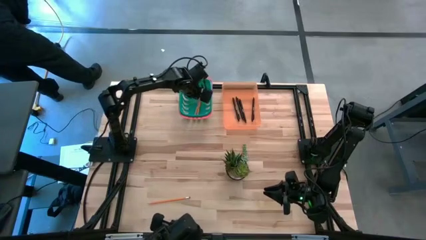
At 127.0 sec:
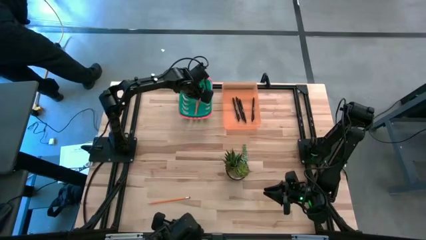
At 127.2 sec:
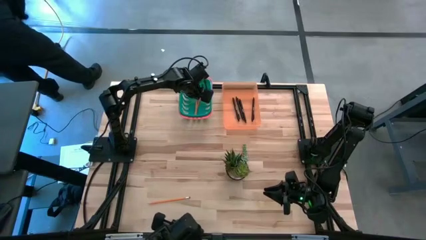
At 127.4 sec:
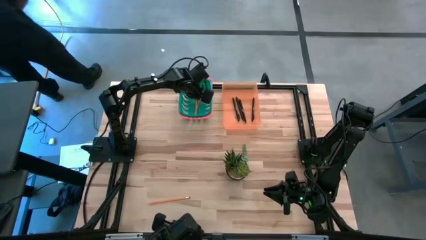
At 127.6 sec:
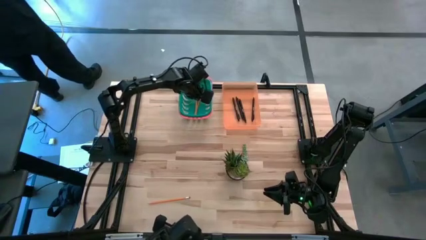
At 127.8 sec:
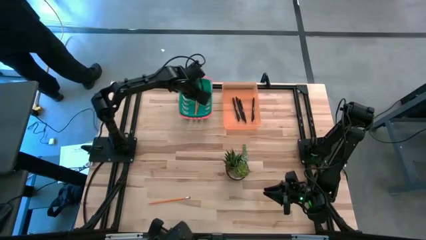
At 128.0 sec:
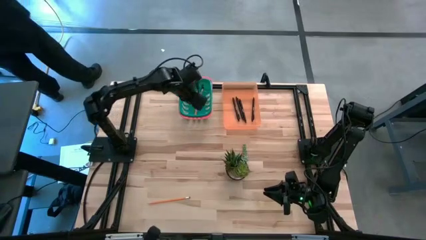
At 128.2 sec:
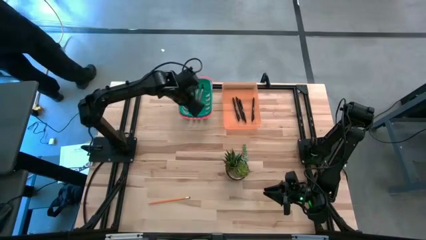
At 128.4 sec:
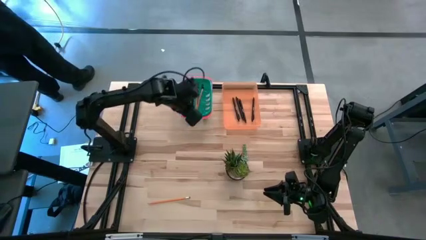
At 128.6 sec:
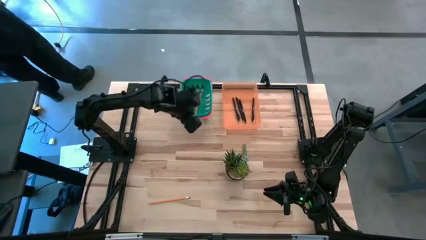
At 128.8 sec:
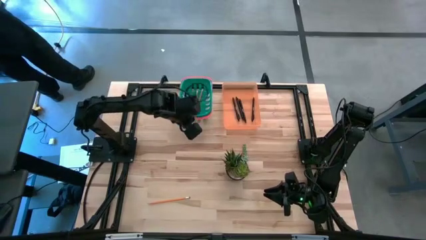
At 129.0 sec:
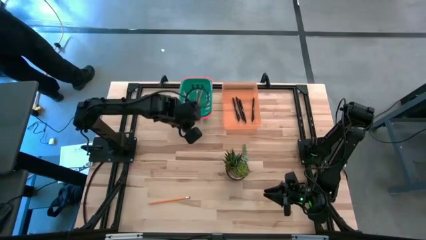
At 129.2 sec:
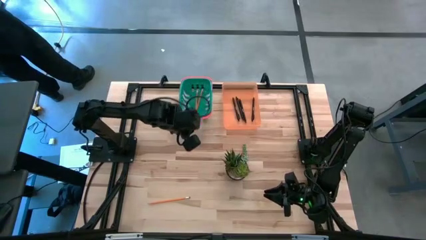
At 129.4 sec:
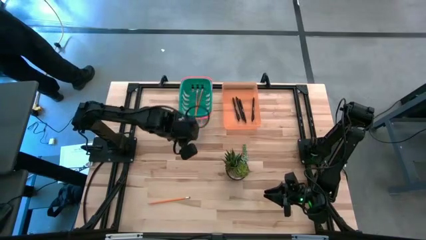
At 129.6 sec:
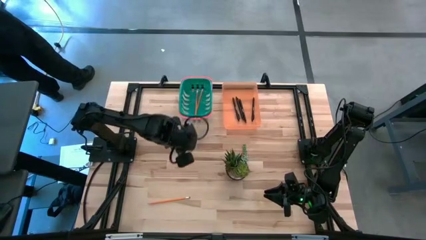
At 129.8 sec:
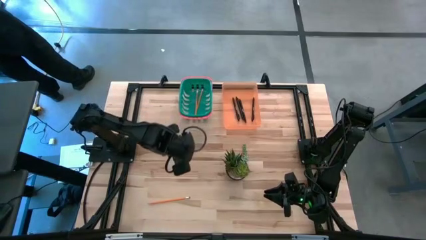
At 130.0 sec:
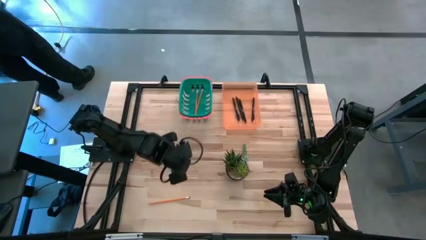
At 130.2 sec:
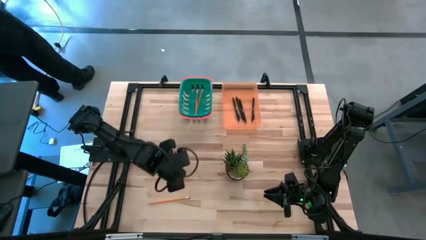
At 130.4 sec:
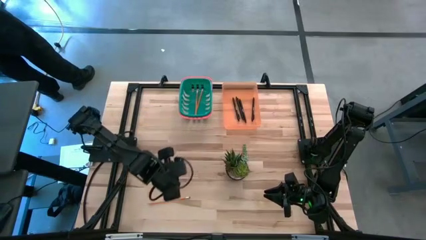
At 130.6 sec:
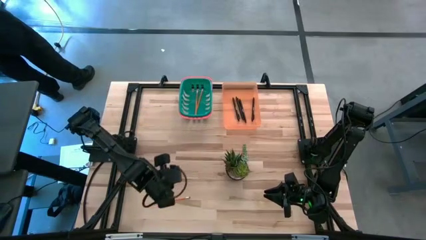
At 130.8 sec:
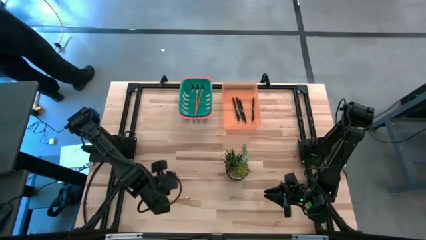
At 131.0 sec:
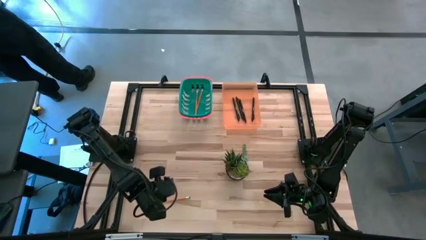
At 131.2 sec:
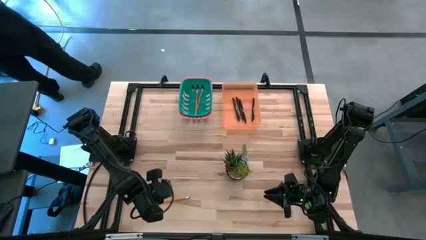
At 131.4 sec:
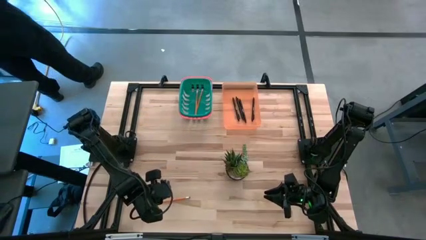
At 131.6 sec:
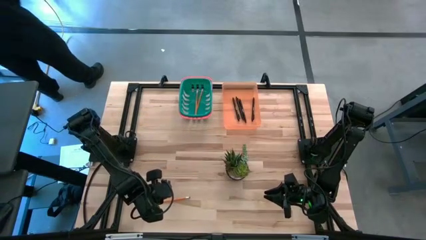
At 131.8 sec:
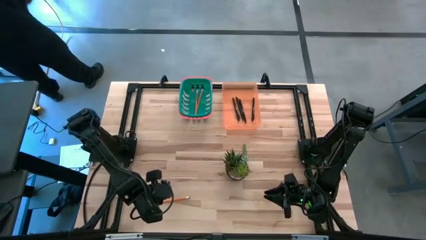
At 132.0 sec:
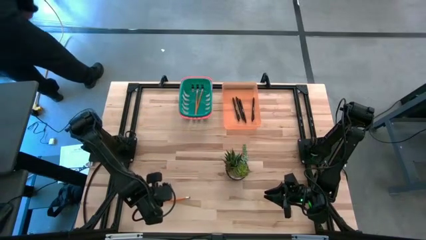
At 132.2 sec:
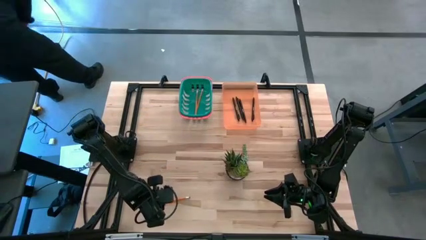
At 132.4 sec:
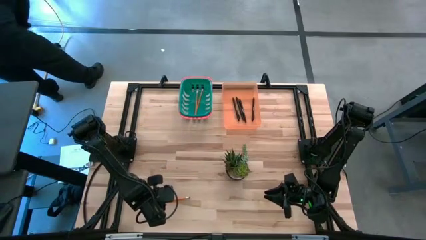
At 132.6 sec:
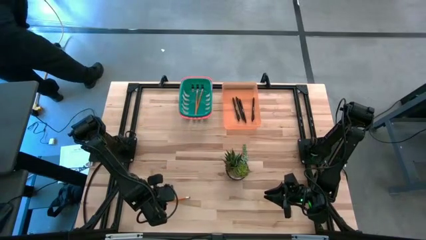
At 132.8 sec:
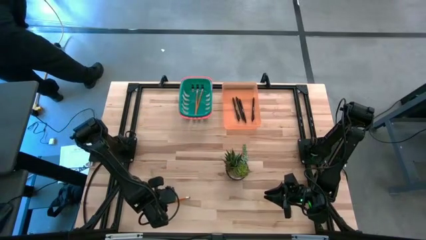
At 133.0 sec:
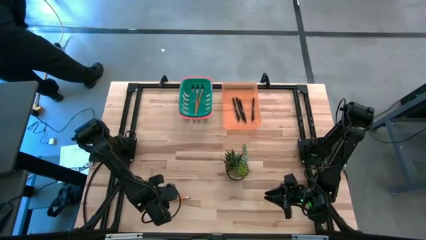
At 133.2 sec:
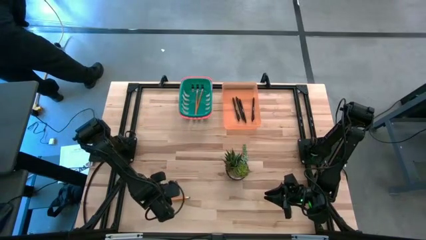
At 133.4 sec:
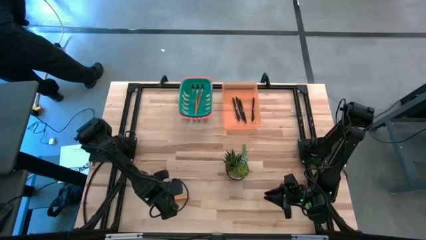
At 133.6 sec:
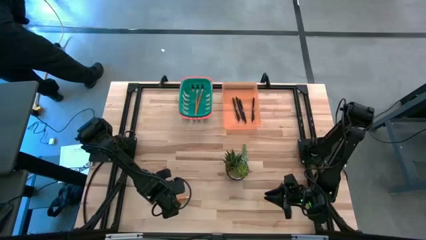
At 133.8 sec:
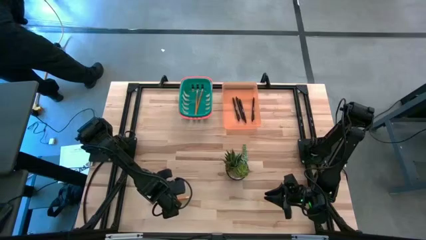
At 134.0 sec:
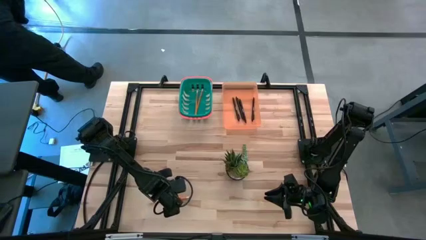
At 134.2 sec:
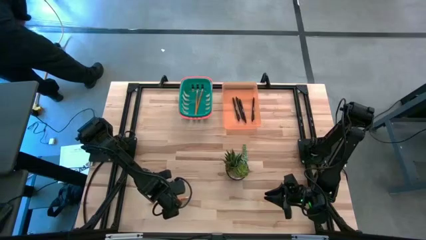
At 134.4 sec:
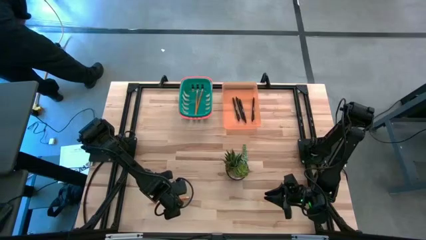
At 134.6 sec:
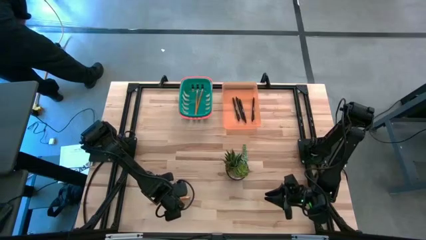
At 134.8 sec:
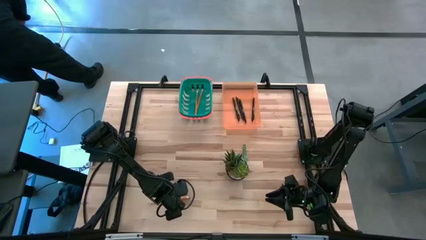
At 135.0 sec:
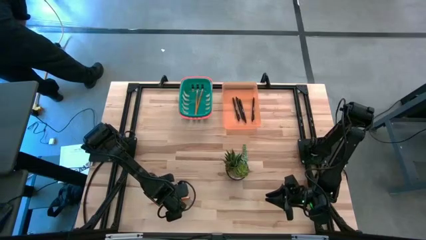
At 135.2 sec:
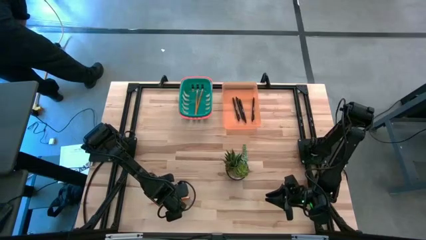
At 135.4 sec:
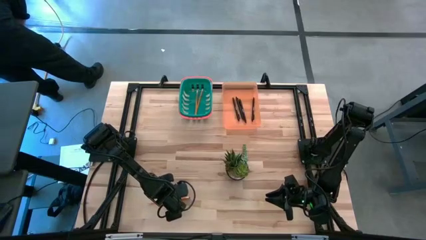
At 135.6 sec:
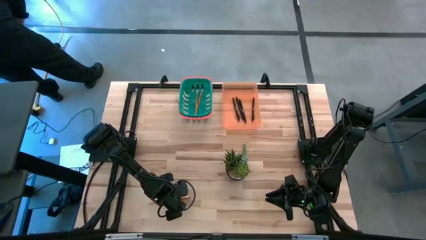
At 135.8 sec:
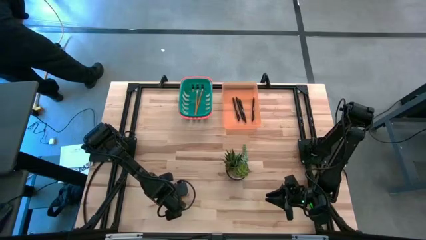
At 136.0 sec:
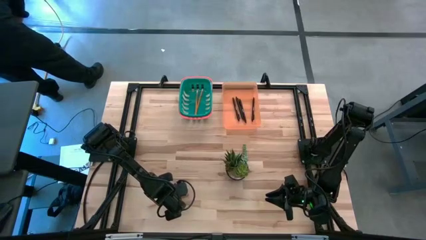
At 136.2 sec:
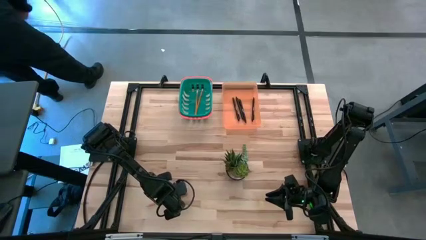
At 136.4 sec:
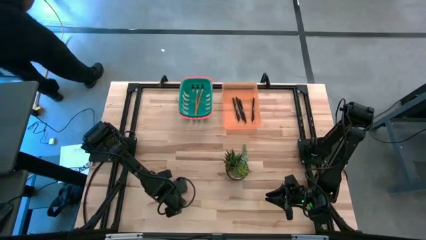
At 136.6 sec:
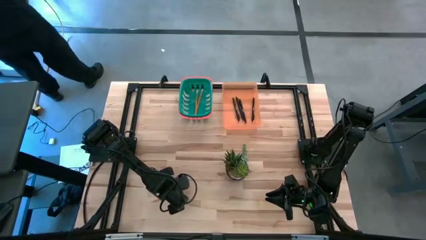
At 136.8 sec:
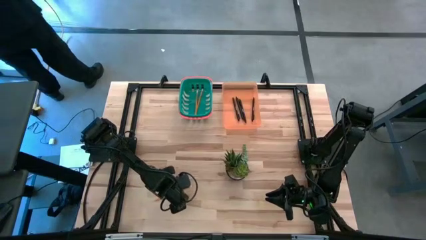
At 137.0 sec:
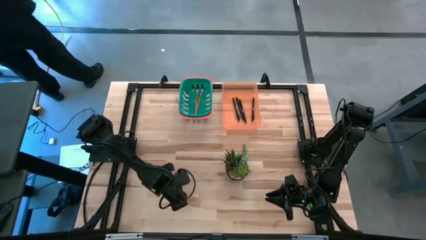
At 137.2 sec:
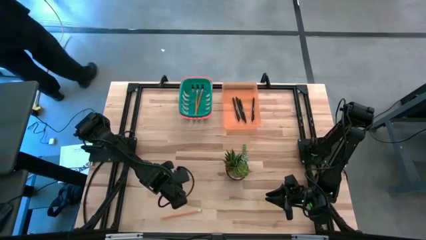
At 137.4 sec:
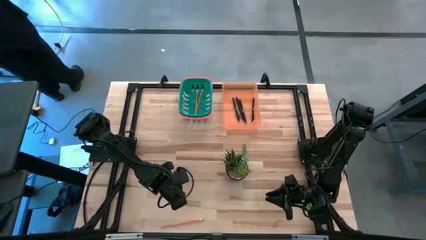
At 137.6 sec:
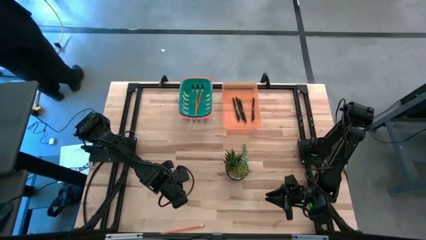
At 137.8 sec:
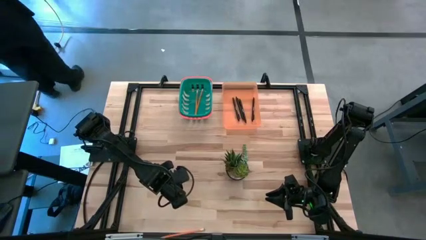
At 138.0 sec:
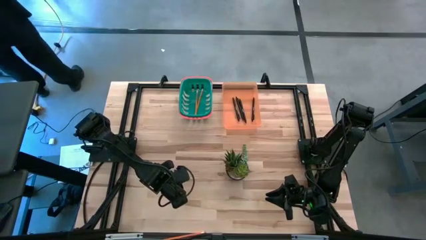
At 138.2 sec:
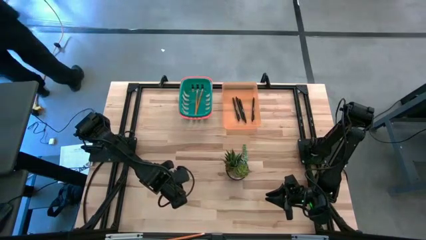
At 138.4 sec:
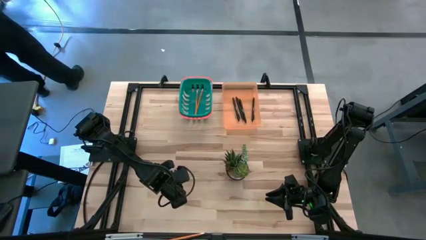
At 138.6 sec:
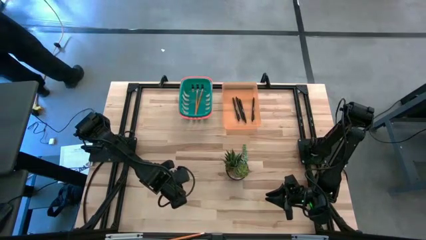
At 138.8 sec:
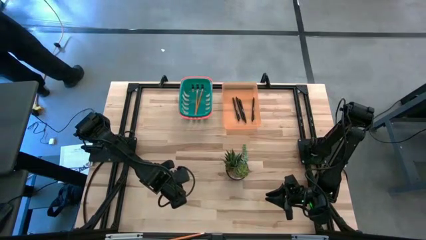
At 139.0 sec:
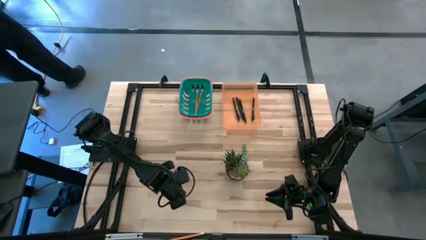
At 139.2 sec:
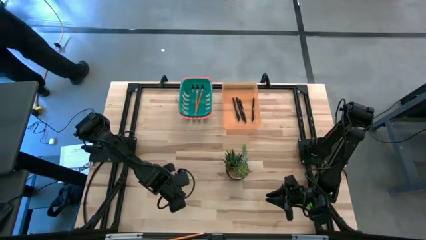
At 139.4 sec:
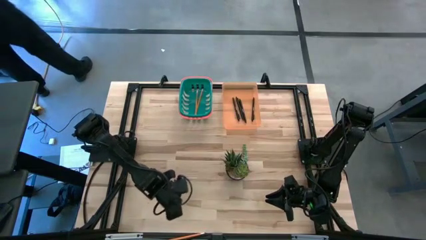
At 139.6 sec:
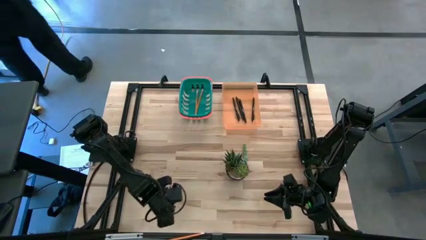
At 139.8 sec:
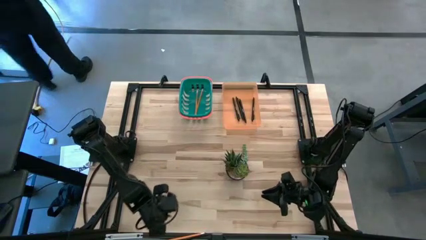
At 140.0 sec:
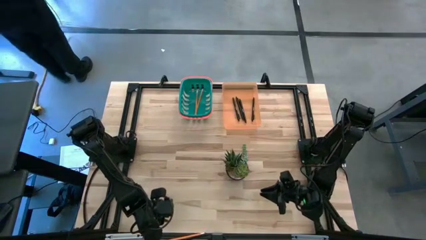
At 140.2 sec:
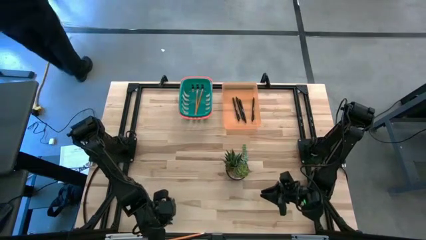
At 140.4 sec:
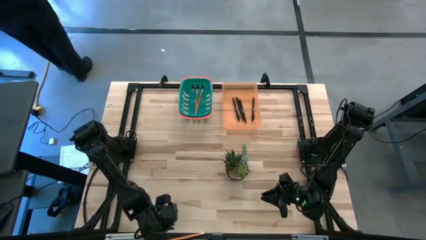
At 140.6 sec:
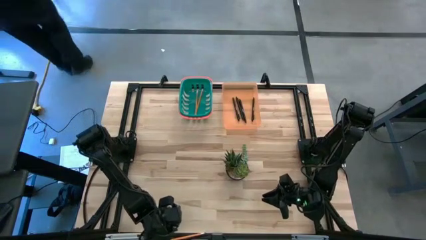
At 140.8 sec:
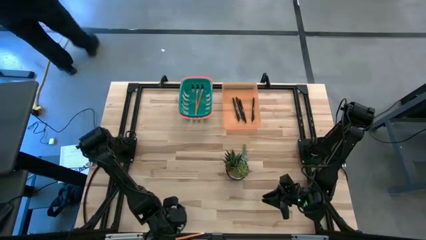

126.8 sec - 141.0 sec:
Task: Sort pens & pencils
Put the pencil into the green bin
